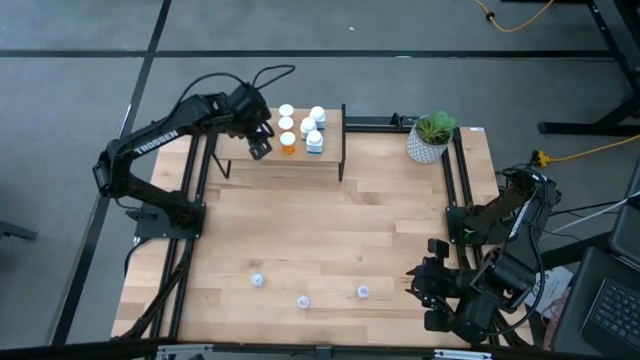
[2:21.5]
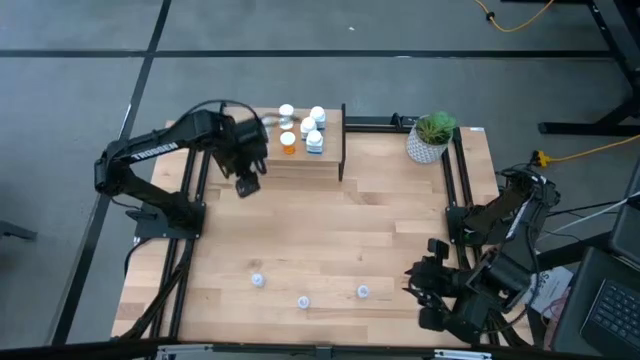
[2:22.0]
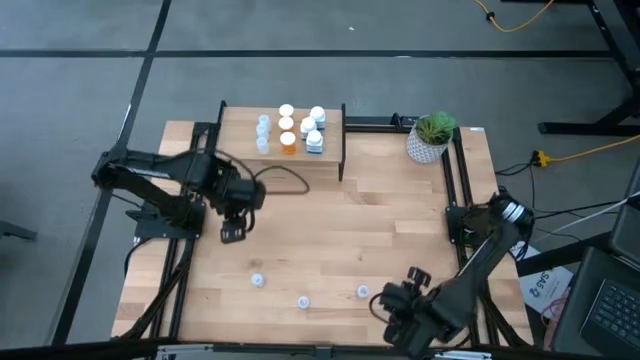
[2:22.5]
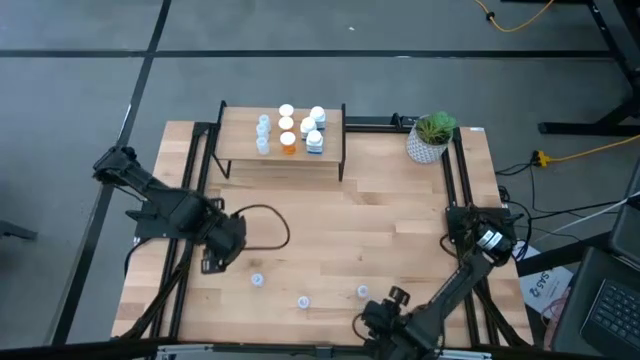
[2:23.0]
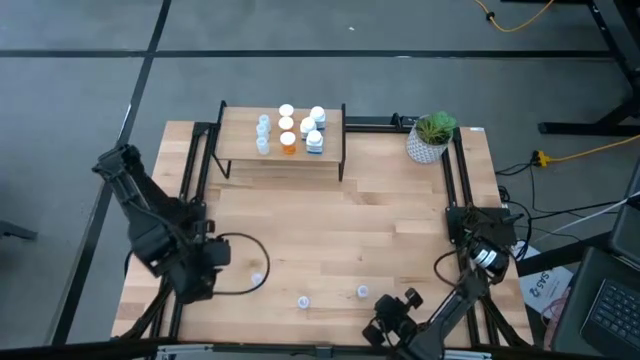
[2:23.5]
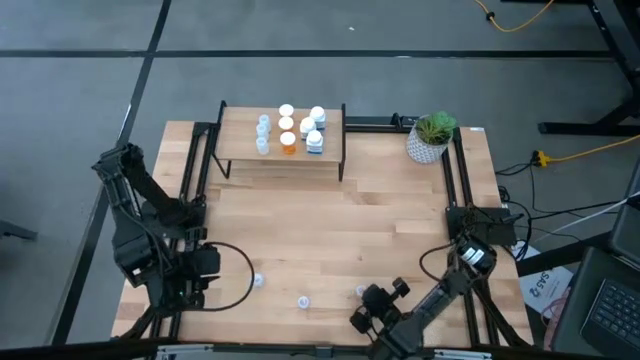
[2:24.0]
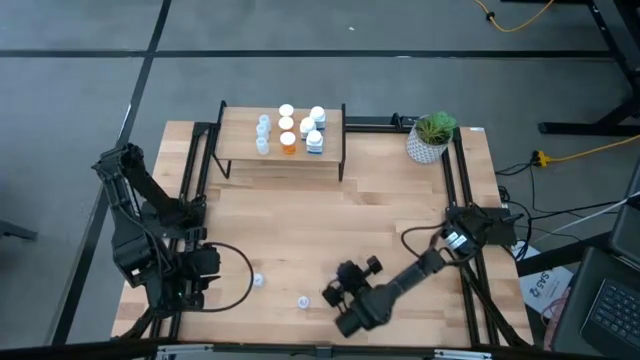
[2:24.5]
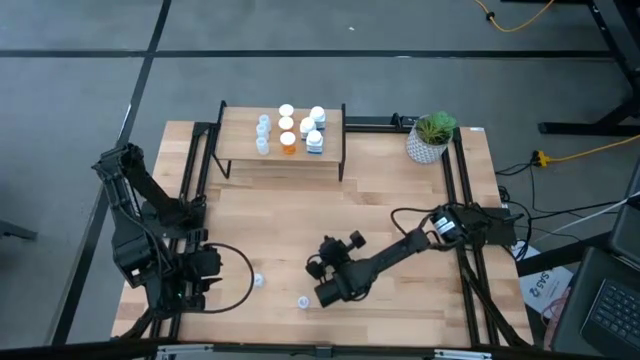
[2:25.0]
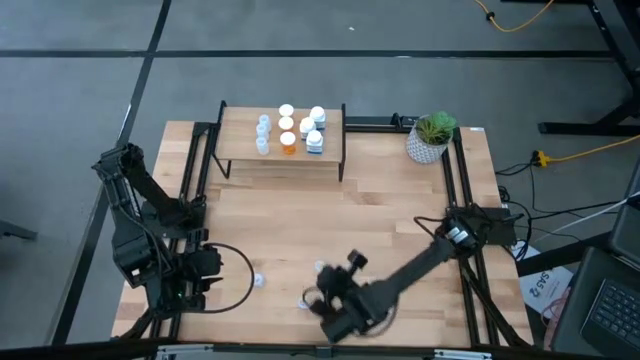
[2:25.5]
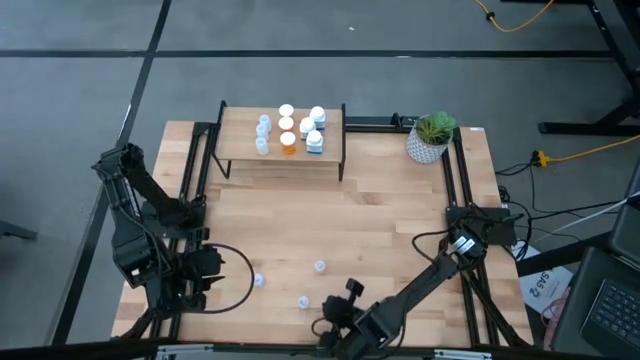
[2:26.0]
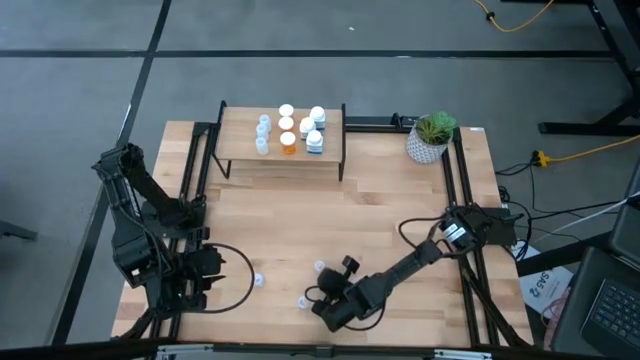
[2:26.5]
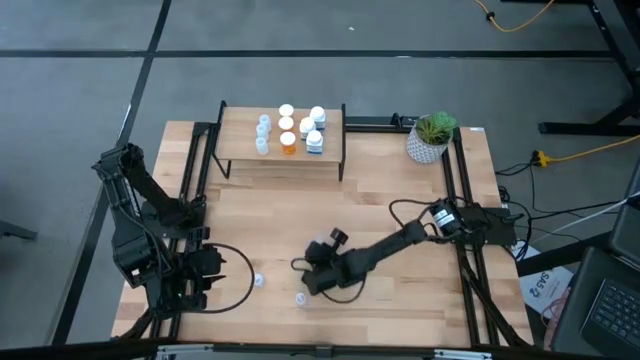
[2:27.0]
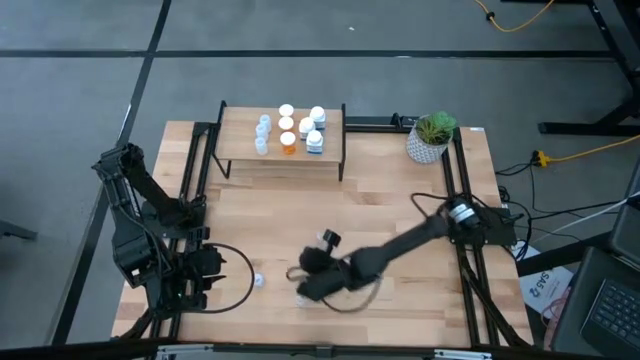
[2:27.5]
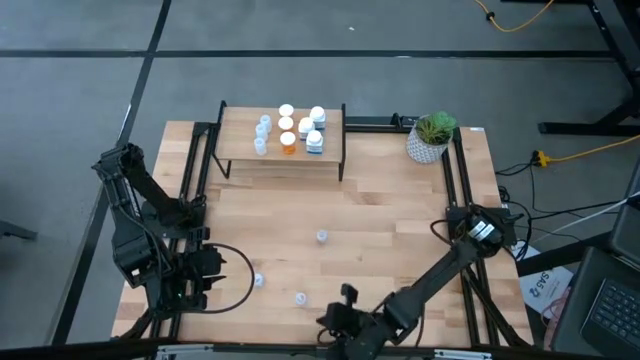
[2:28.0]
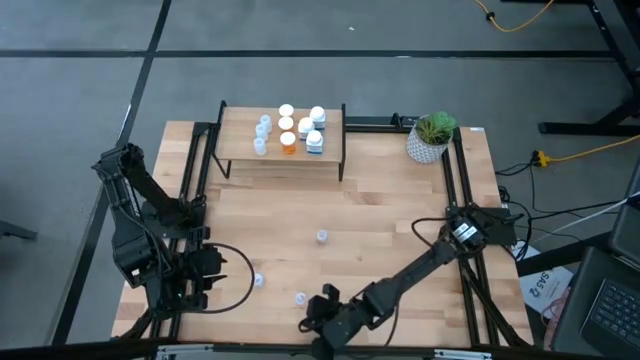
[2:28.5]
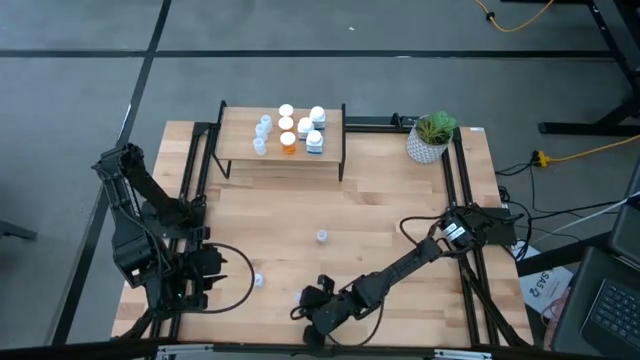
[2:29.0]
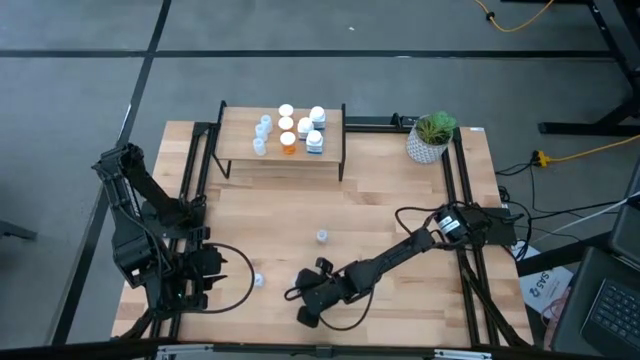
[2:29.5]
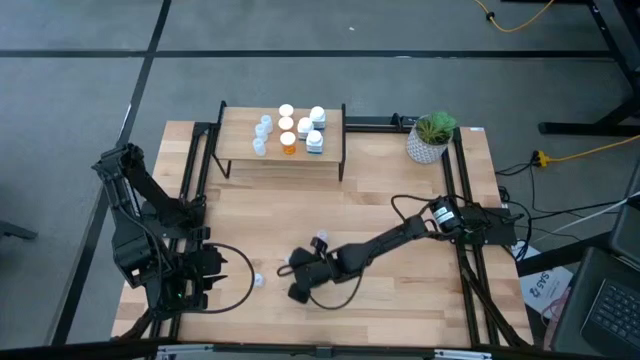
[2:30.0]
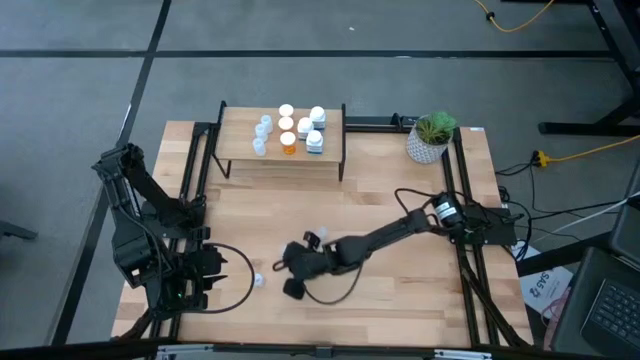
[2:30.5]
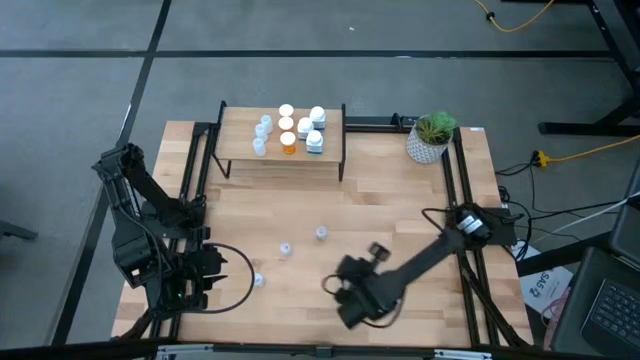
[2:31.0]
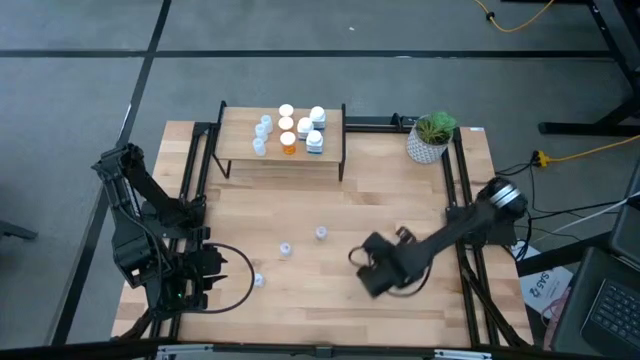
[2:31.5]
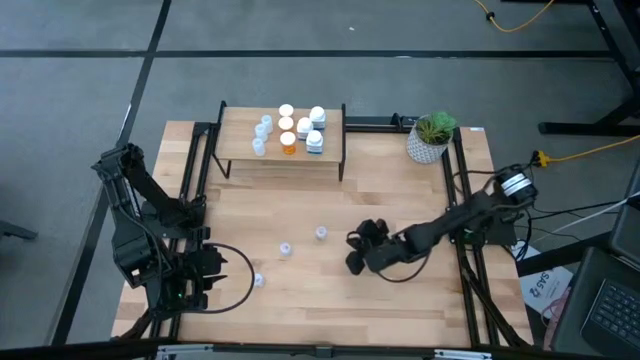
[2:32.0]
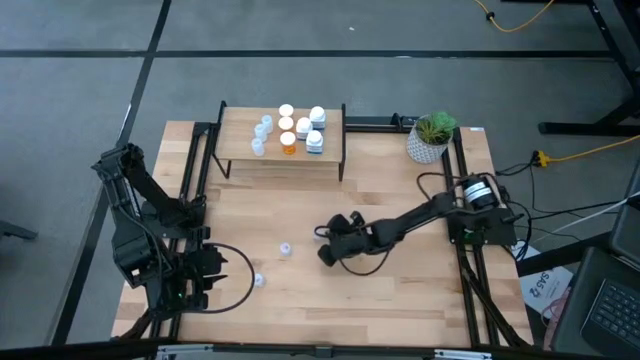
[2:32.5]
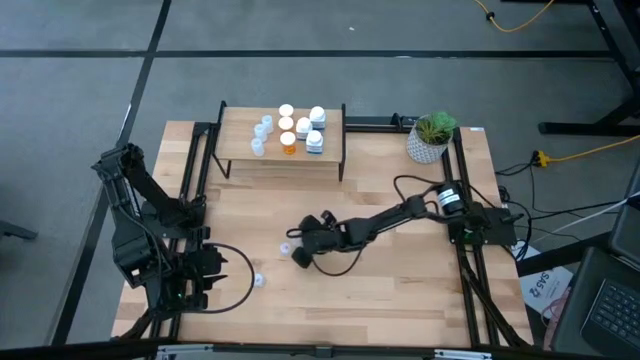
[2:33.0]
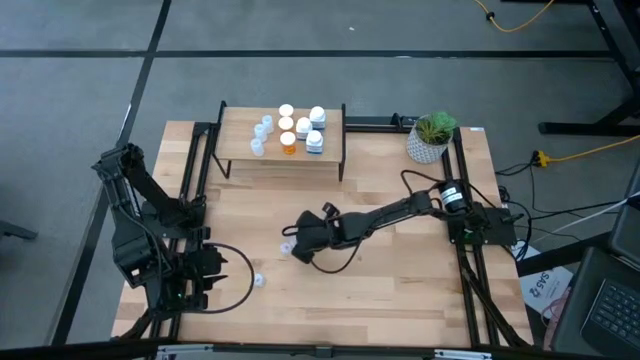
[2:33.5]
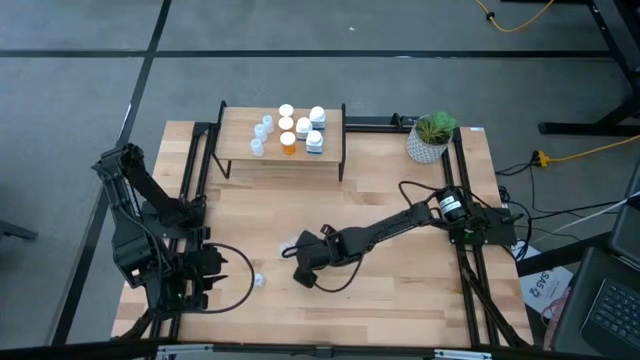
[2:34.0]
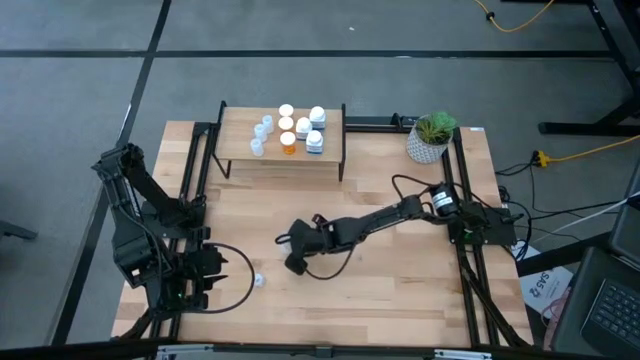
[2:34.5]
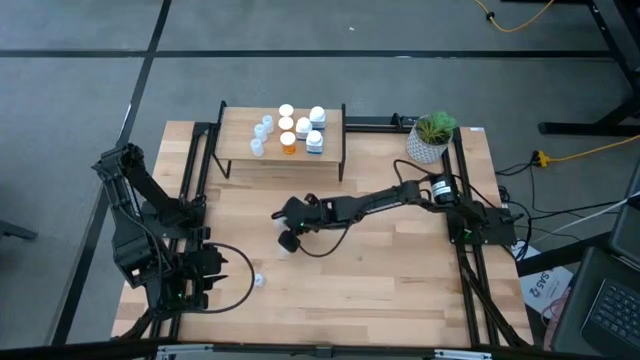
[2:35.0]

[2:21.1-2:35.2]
Task: Pick and place medicine bottles onto shelf by color
Move the pill bottles to the center of the table

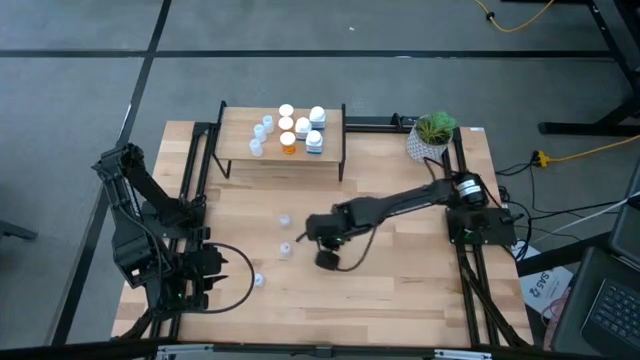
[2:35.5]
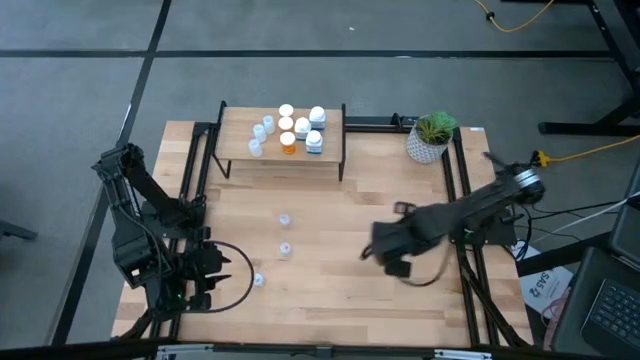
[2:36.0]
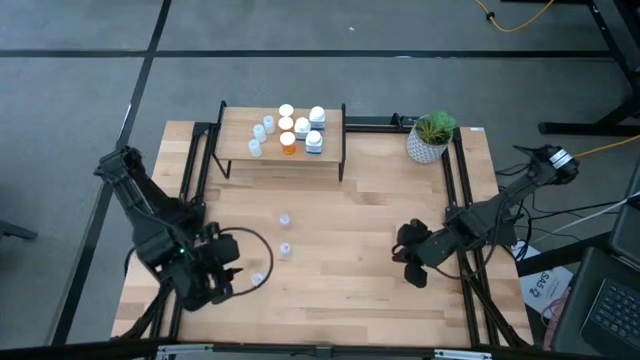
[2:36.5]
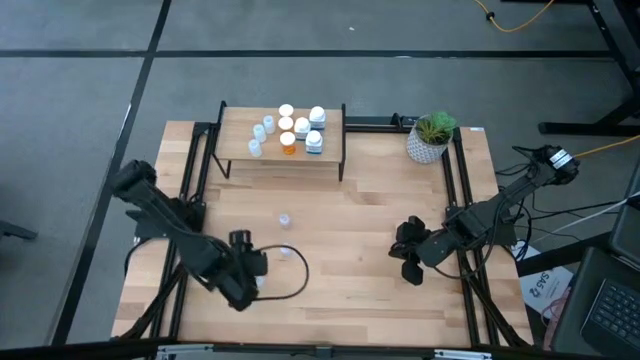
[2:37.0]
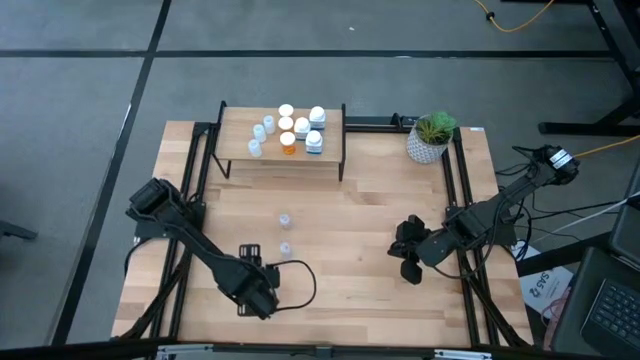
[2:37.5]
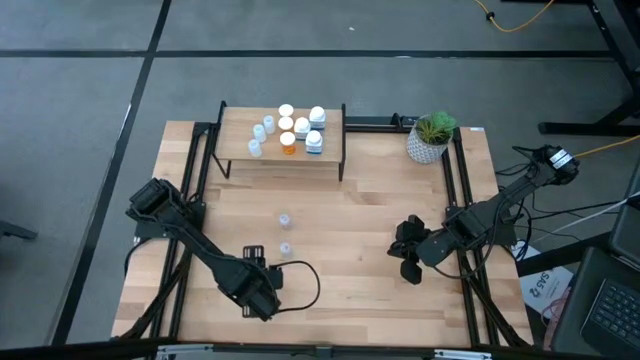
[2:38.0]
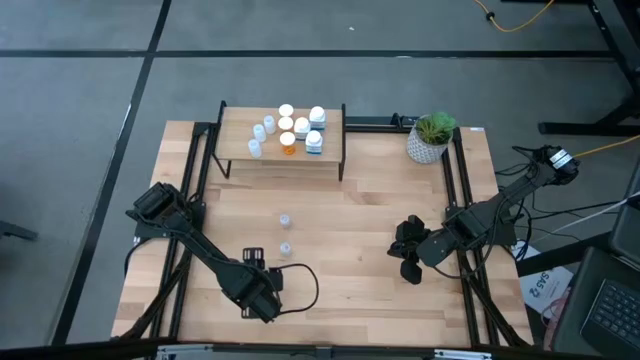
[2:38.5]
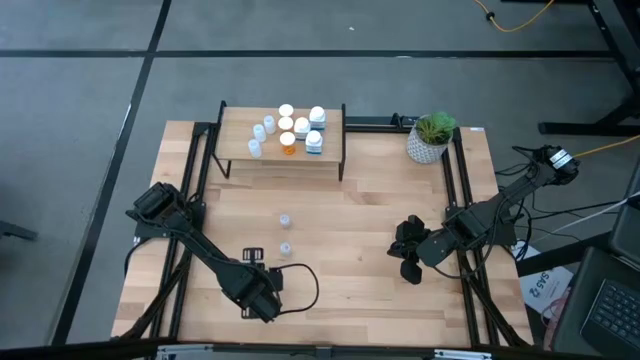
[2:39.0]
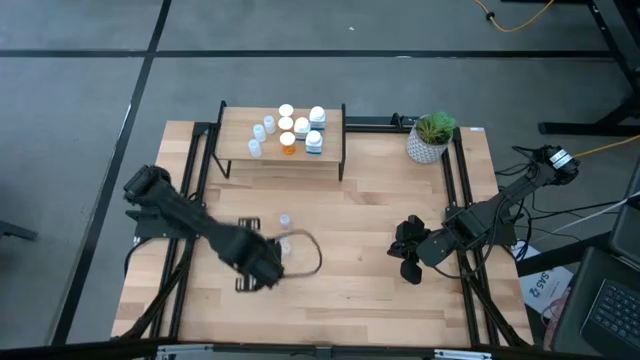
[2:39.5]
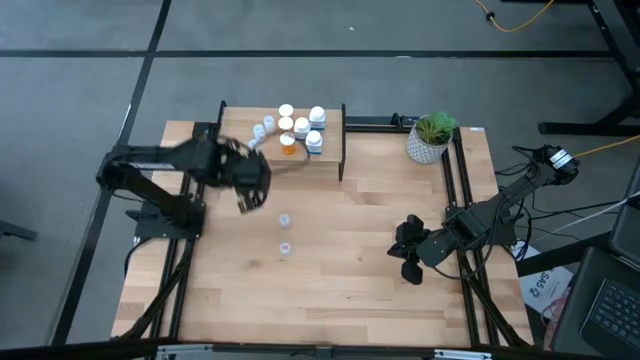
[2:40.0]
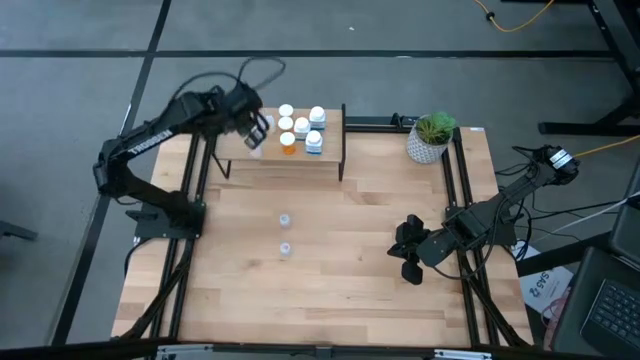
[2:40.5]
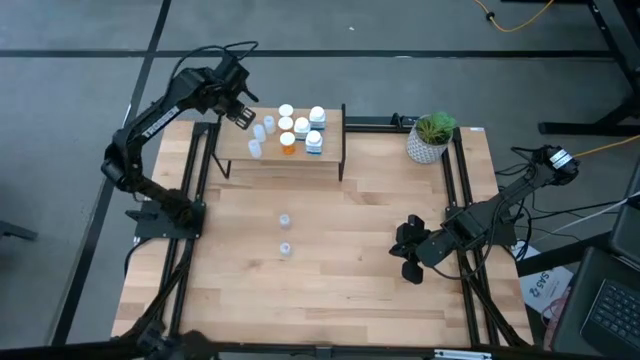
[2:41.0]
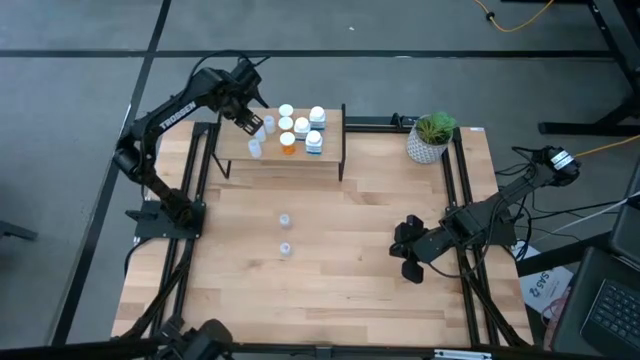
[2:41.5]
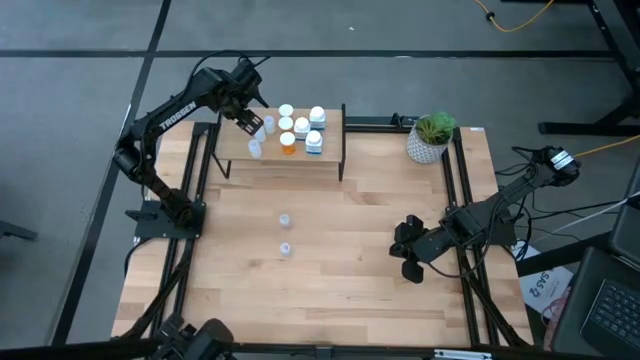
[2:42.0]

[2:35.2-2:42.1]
Put the transparent pill bottle on the shelf
